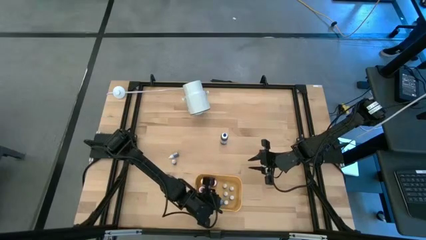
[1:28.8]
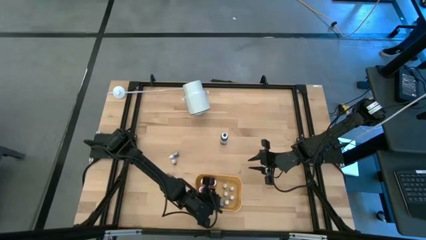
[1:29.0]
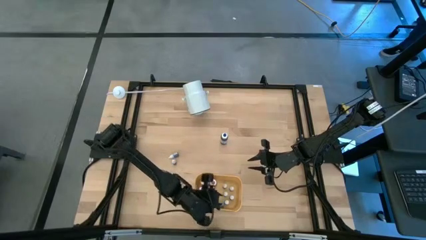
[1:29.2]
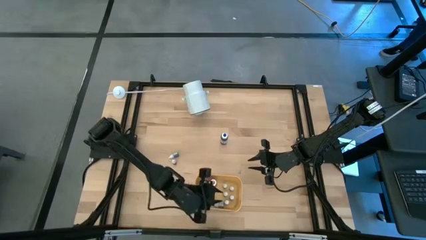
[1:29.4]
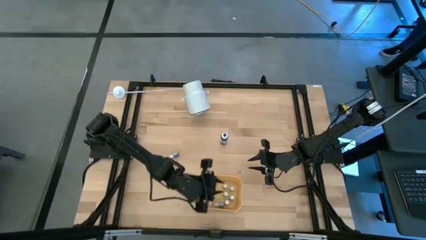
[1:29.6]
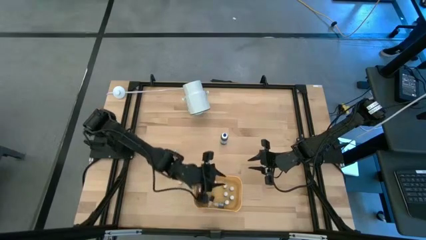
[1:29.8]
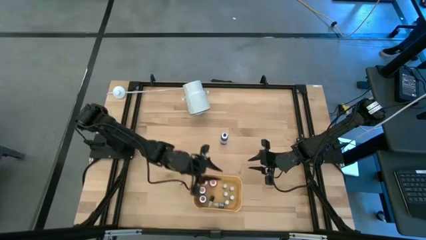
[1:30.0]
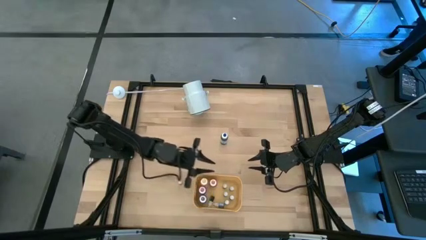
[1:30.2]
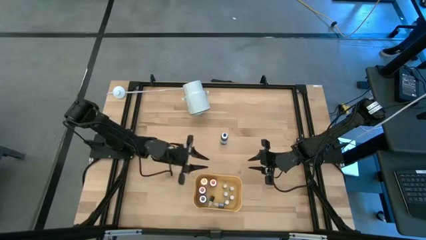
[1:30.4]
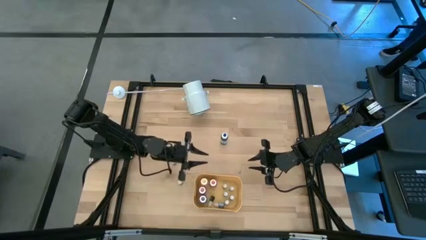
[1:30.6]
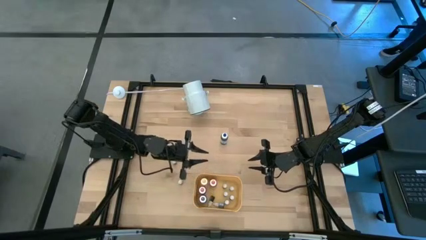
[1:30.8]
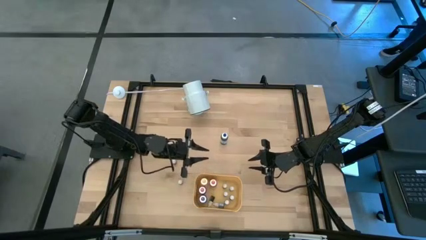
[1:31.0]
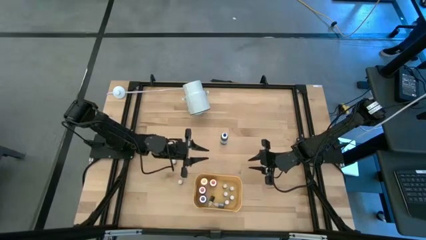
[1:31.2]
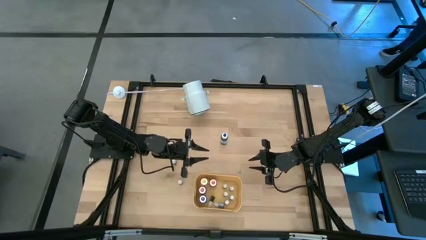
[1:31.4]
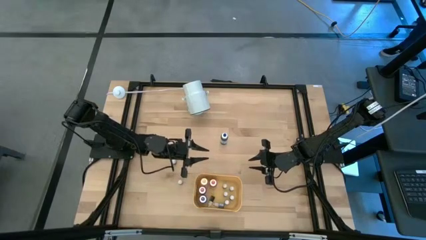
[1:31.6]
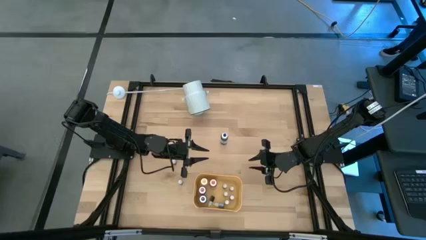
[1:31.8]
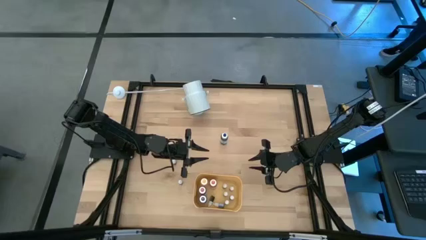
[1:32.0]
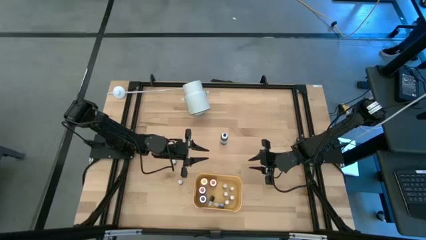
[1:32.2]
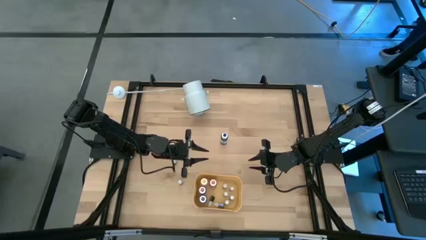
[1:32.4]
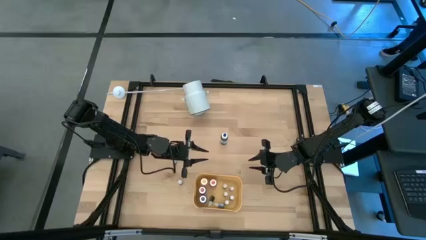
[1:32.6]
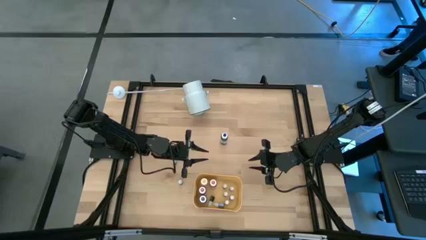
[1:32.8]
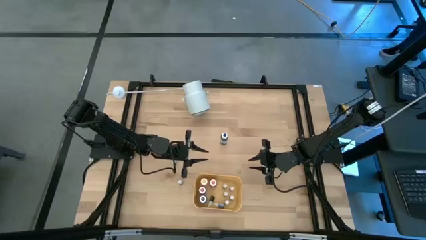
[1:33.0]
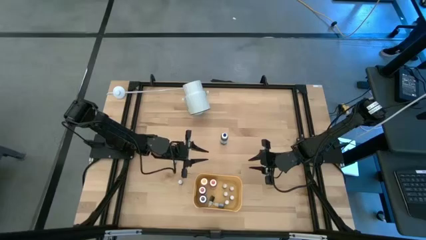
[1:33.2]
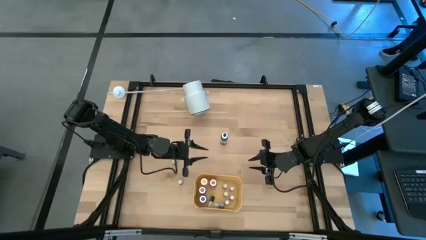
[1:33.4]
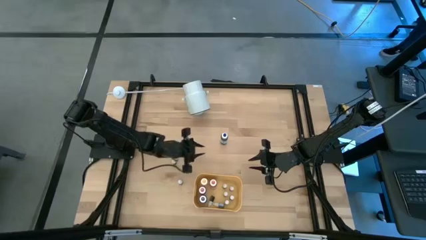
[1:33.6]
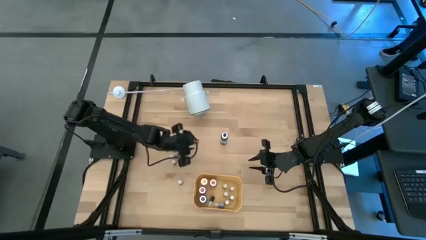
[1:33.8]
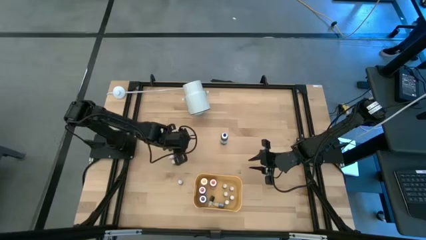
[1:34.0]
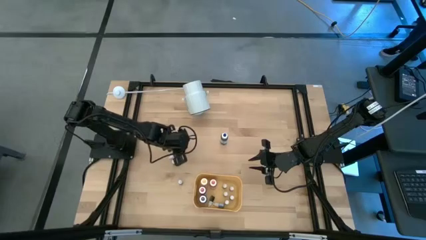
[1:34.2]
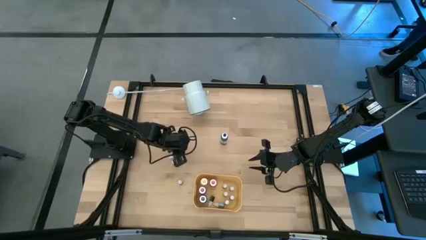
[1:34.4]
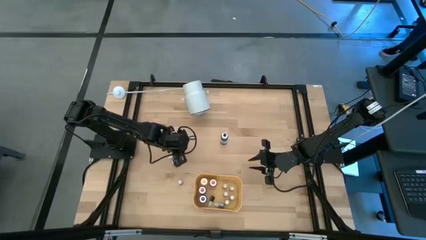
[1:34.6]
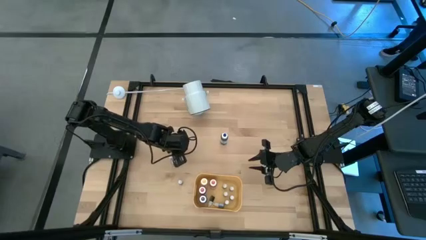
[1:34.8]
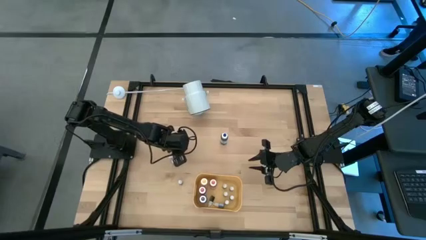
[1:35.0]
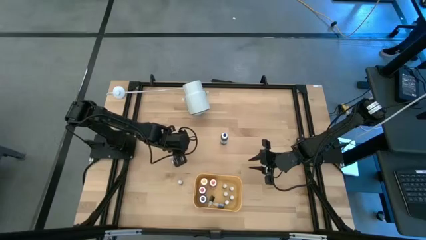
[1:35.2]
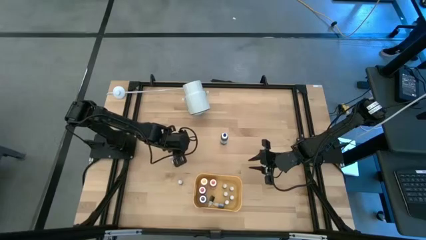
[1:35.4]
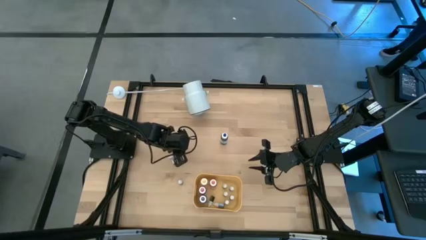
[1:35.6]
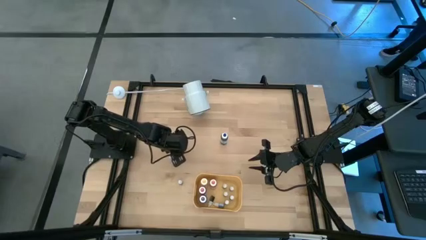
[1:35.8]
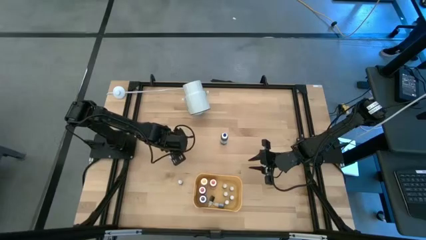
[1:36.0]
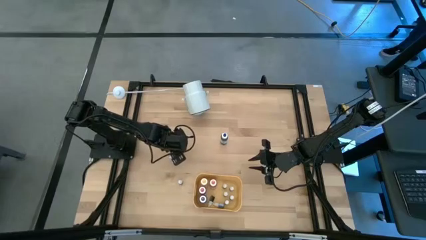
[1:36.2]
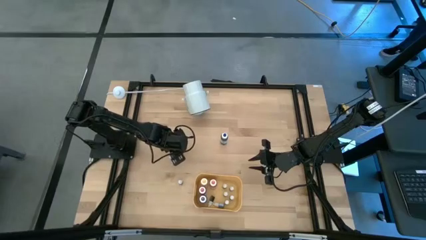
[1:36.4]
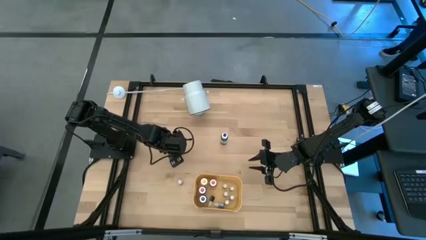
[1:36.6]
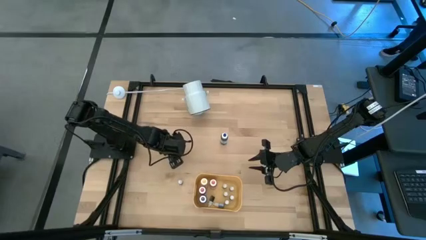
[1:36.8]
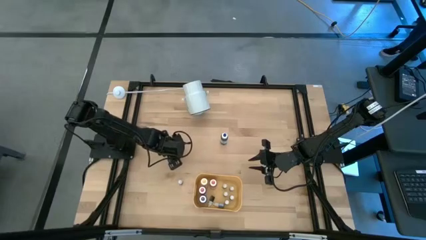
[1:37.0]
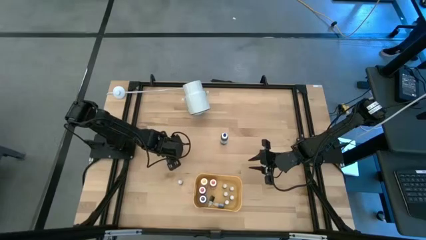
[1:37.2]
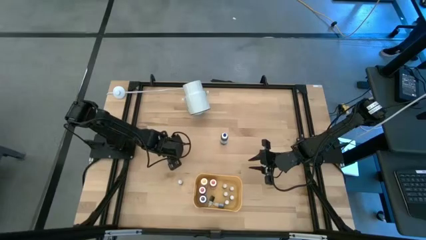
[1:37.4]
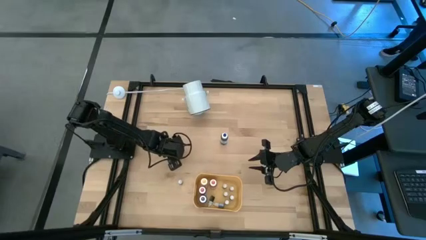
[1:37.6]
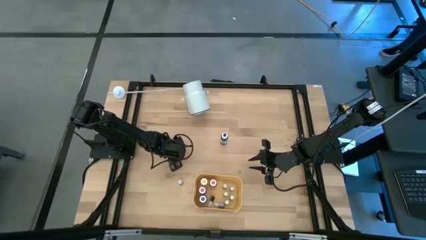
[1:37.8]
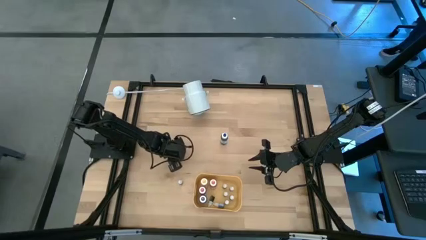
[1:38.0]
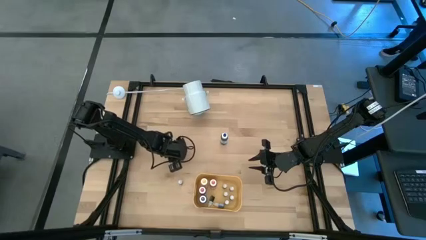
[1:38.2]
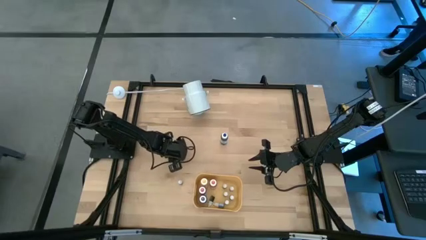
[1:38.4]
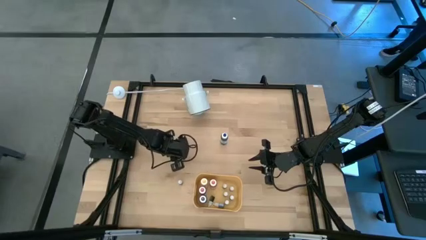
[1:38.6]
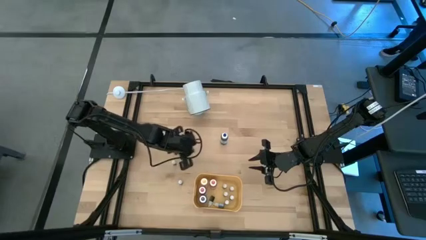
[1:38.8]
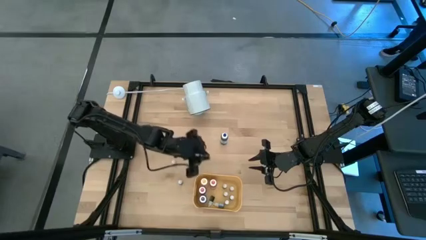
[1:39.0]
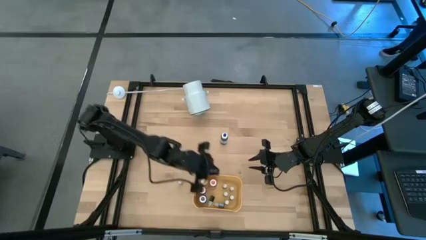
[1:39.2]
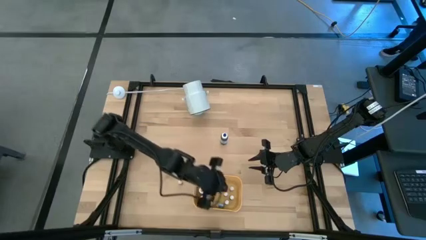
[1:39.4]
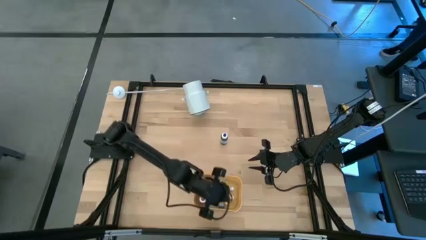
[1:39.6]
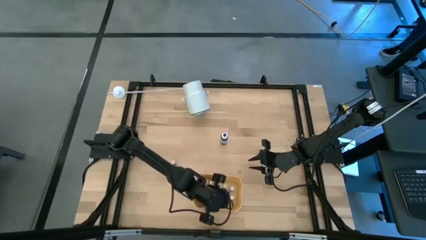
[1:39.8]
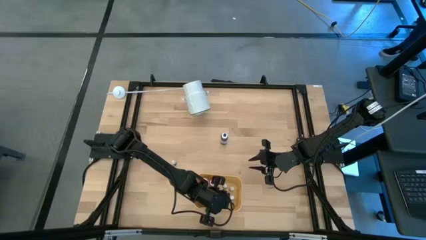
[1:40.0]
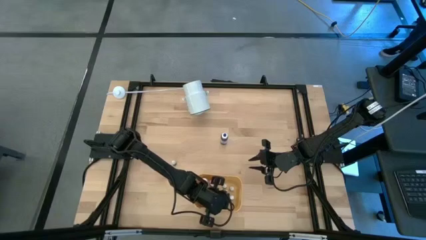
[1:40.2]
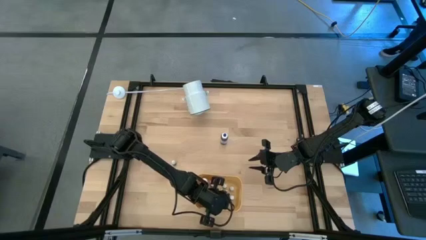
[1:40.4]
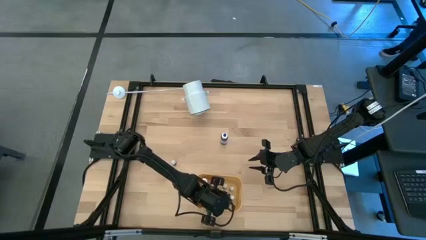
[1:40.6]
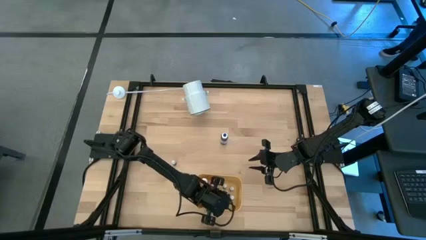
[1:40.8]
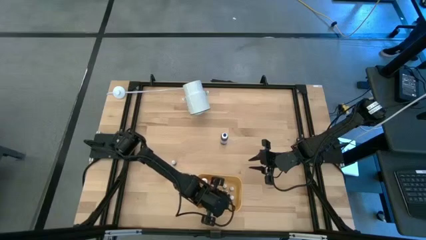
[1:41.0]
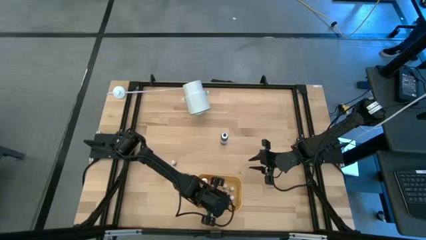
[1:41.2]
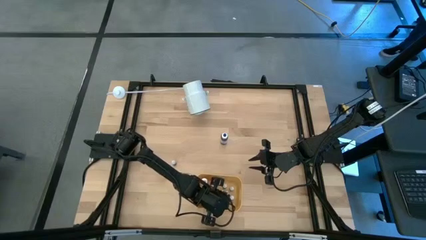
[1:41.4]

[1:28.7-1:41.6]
Task: Pick & Place food coloring
Put the small blue food coloring bottle into the yellow bin

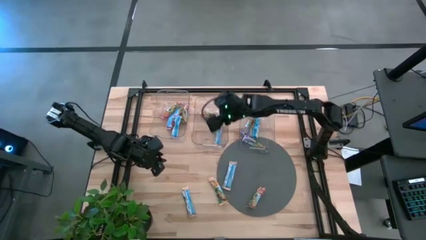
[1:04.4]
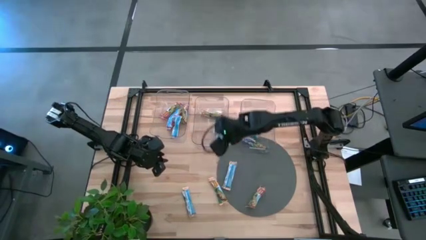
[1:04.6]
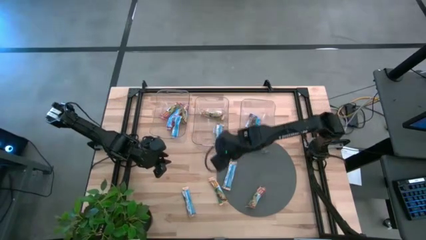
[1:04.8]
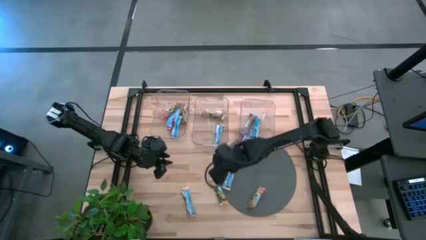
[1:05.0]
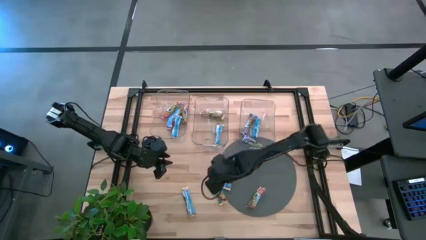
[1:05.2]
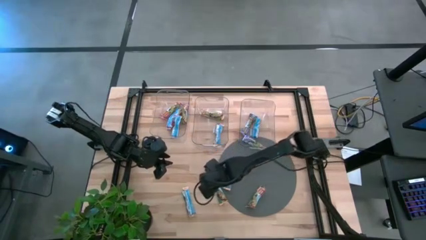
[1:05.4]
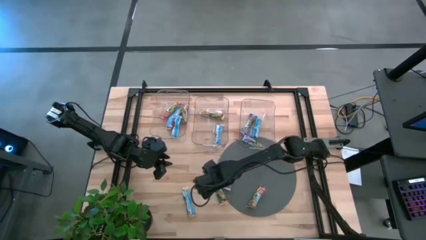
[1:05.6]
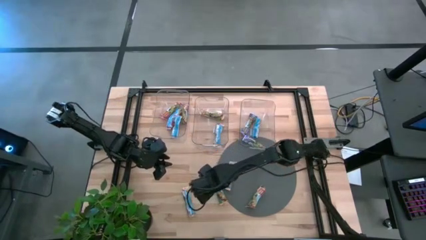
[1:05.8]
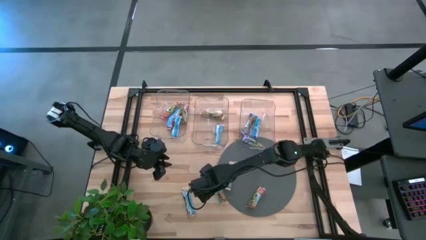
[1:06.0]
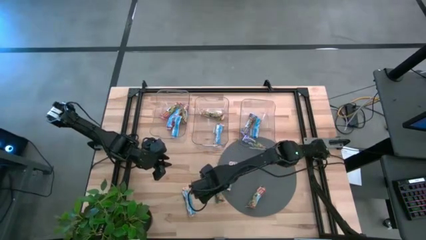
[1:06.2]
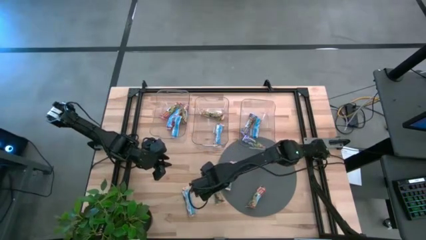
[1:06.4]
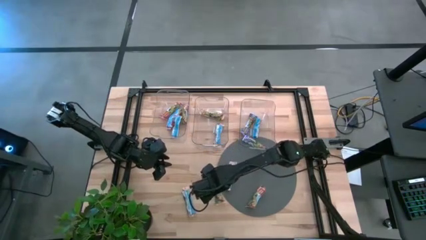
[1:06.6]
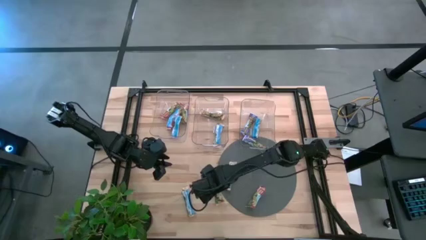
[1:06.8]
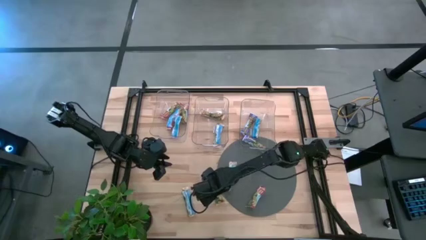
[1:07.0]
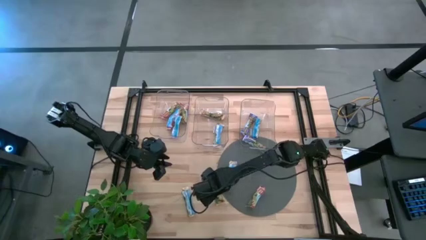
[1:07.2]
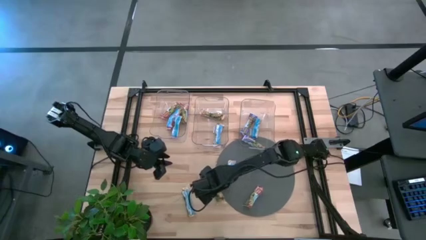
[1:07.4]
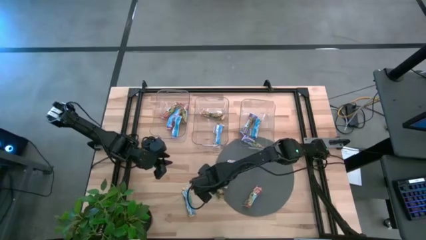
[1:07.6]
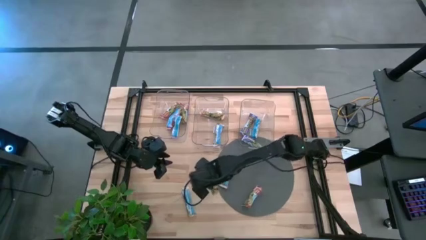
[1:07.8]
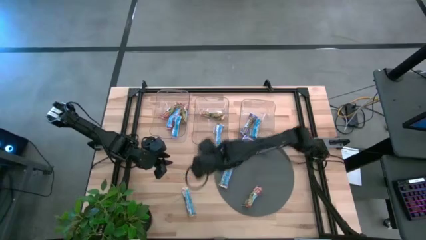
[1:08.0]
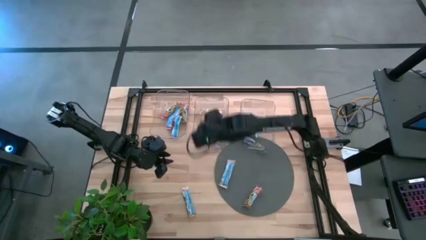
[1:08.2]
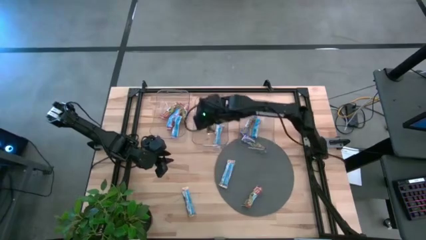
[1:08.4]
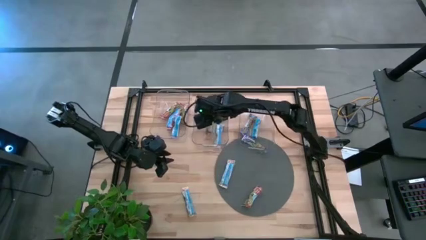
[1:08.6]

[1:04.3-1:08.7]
Task: Pick and place Granola Bars by type
Put the orange snack bar into the middle transparent bin
